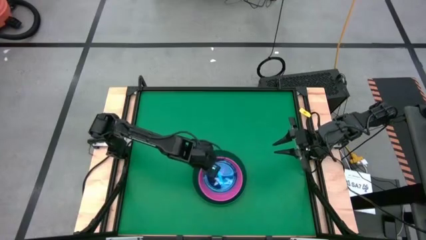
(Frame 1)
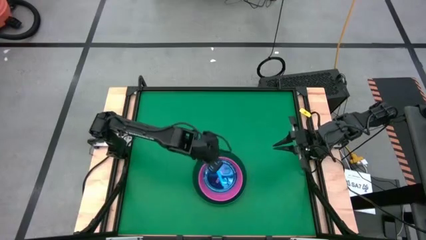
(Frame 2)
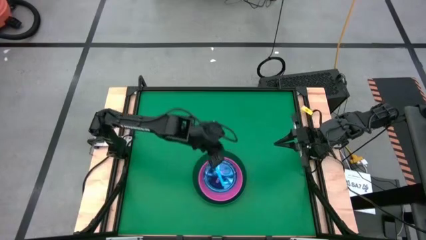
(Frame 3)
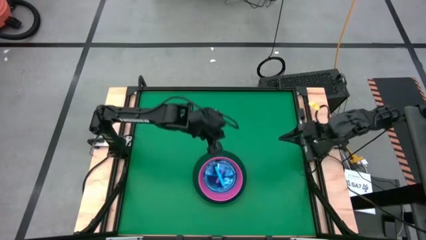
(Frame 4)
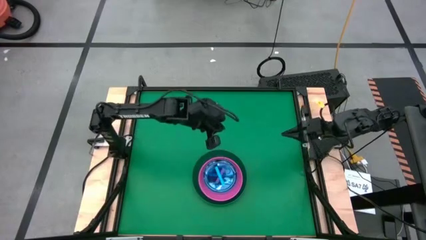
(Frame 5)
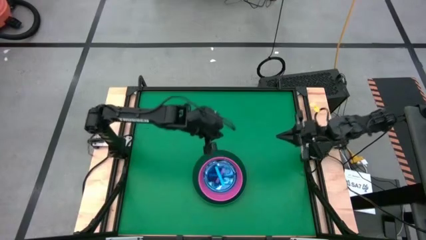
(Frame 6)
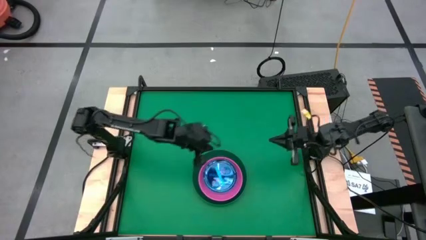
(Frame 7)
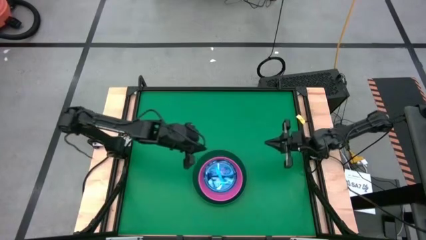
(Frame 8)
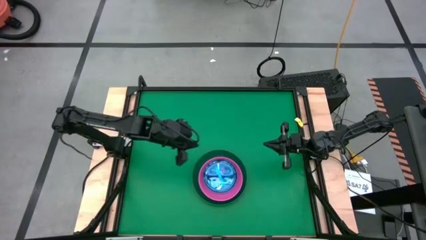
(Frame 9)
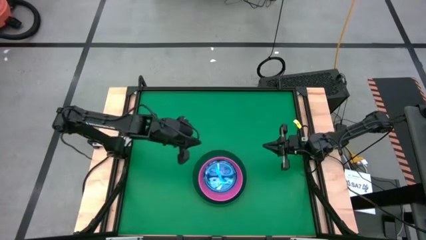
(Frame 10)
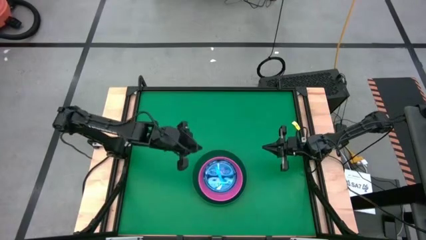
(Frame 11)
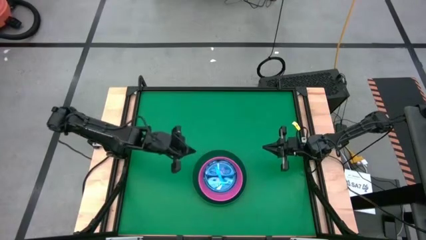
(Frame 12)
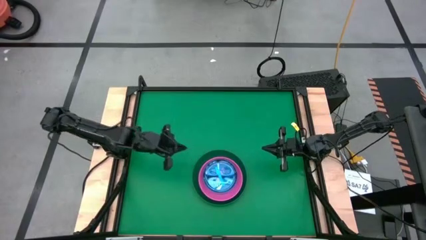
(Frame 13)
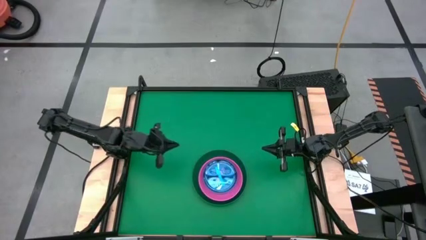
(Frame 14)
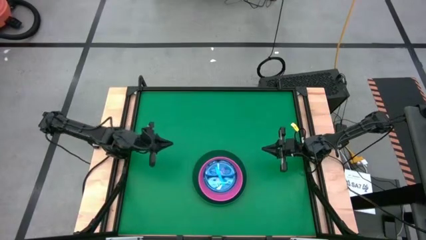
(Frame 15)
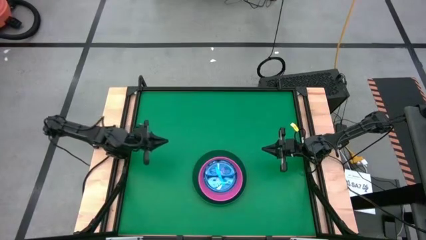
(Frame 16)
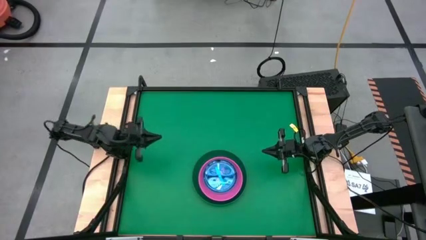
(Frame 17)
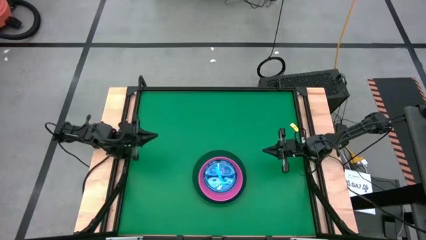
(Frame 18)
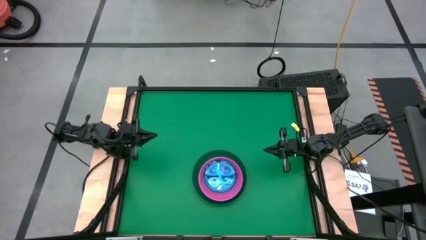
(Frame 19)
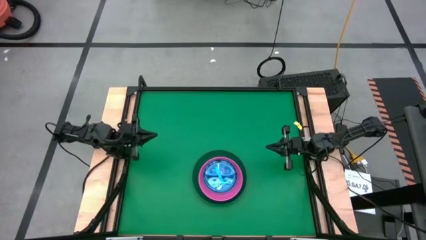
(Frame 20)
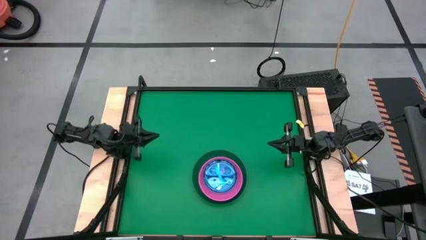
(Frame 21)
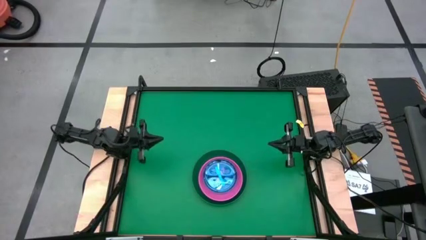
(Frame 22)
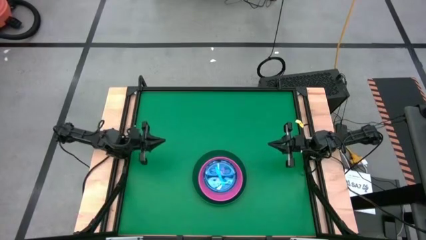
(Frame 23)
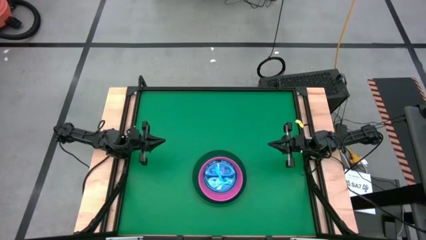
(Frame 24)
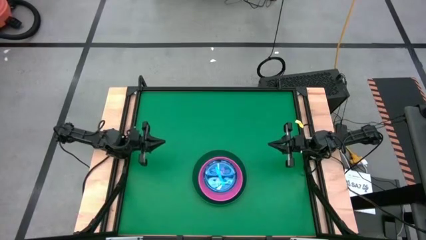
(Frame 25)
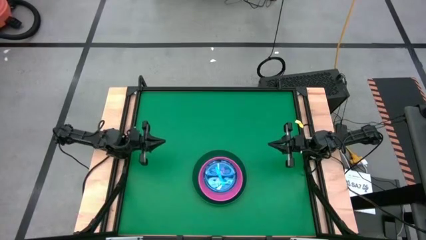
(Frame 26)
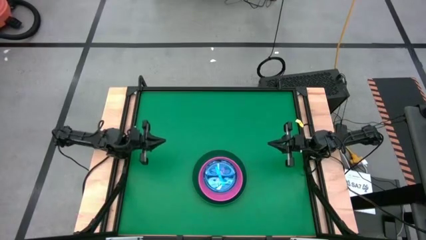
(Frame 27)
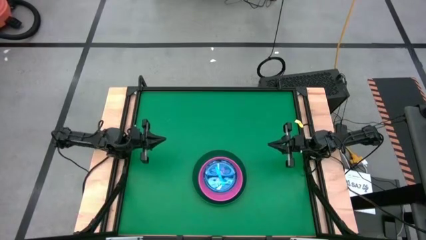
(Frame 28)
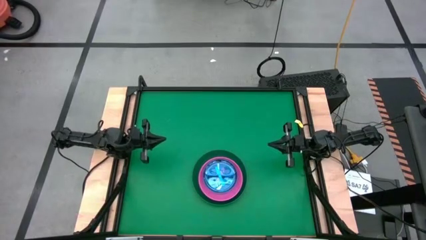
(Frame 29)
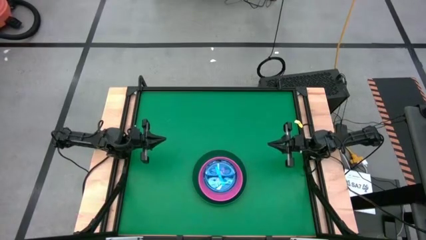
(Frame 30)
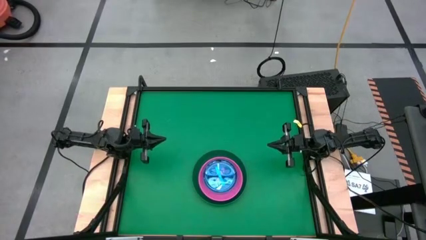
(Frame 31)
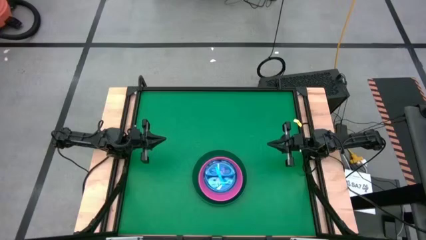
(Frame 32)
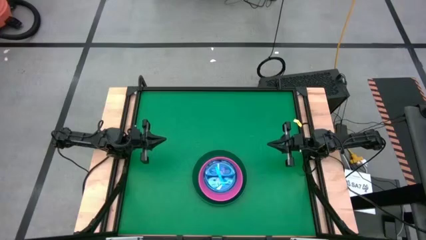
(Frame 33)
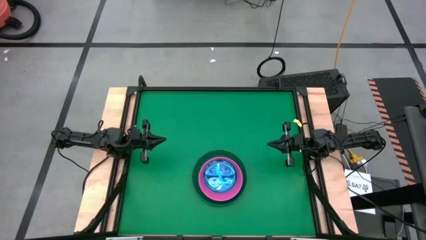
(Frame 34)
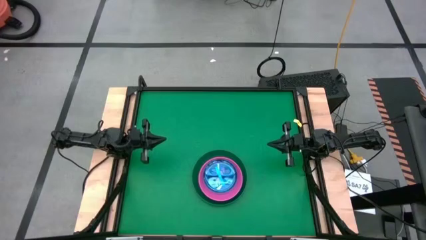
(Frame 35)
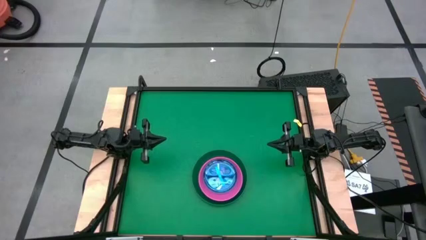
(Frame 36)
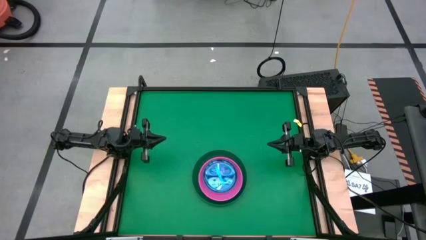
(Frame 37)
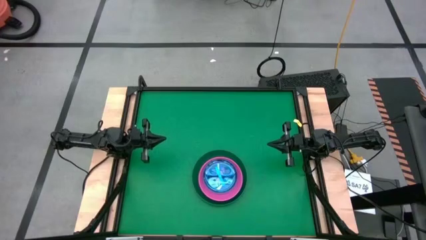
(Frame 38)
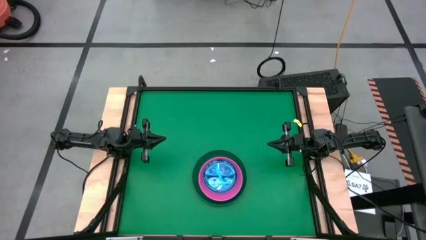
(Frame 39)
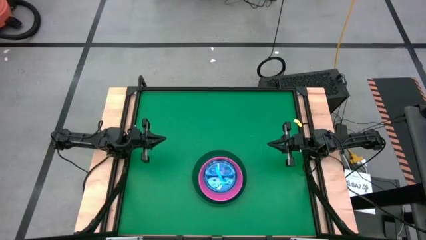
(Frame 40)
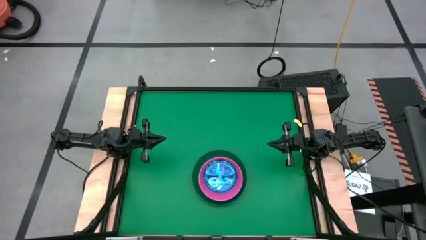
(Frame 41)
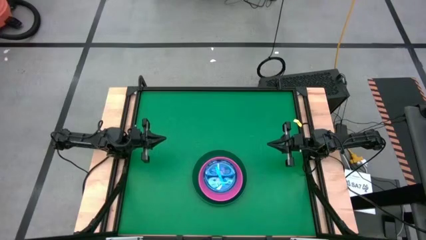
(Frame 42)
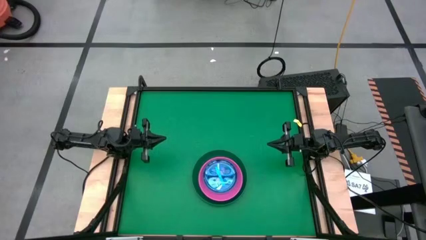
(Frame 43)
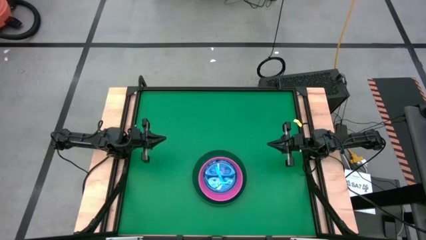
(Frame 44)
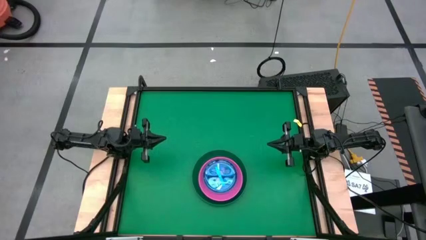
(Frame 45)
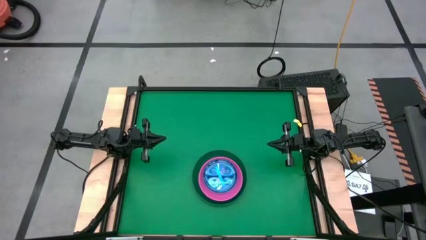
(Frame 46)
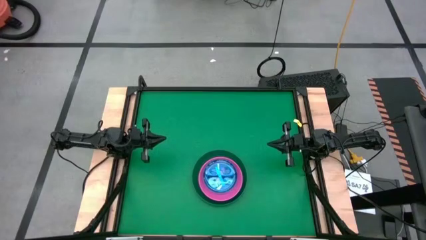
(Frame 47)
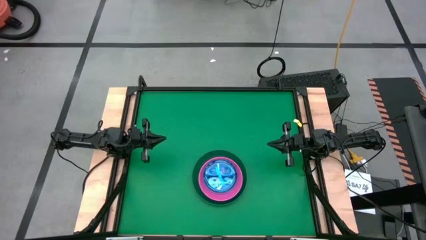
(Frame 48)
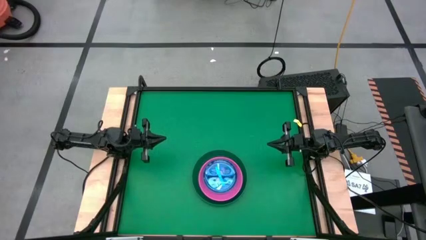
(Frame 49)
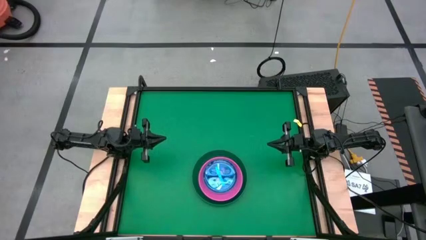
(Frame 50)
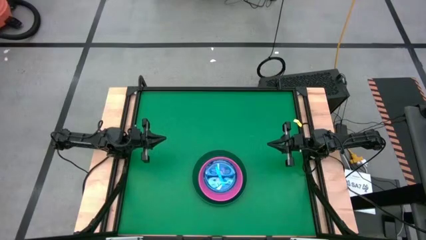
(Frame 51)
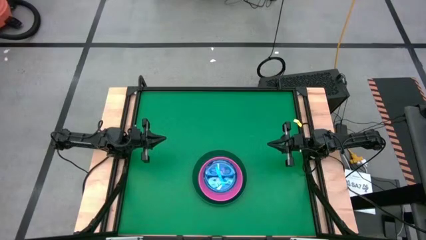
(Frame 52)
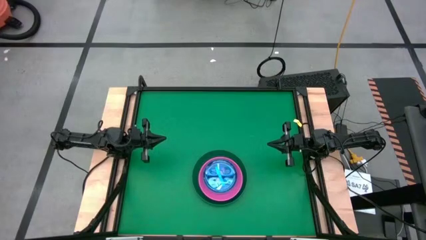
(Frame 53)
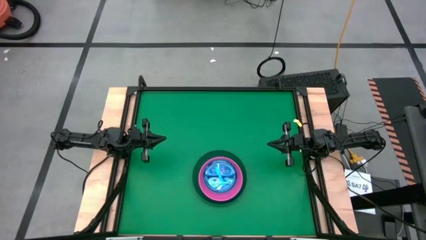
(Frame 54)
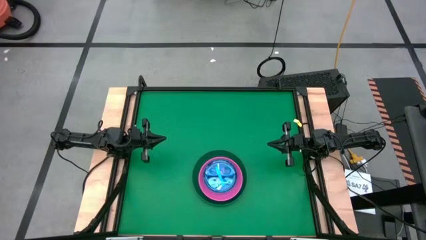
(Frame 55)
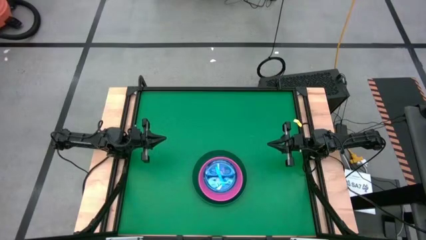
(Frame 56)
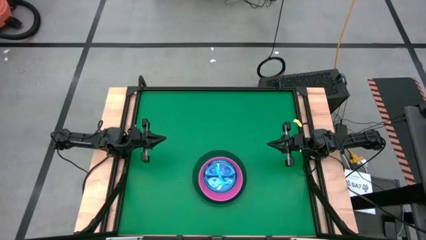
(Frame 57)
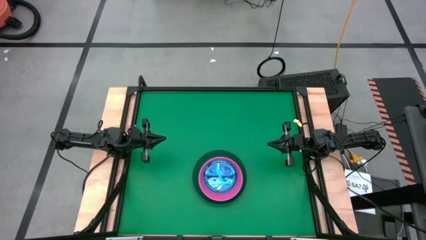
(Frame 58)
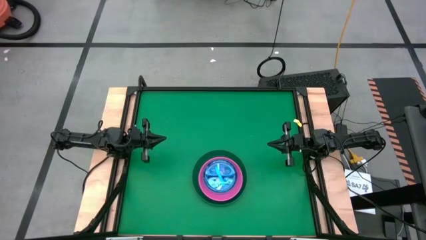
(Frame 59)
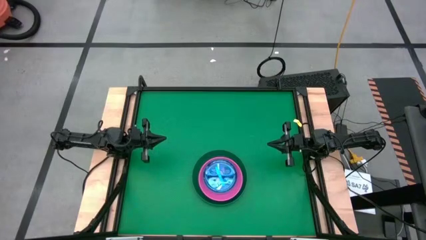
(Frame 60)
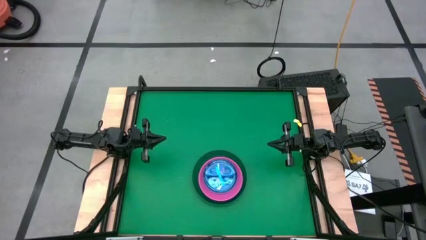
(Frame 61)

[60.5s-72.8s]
Task: Stack plastic plates
Return to Home Position
